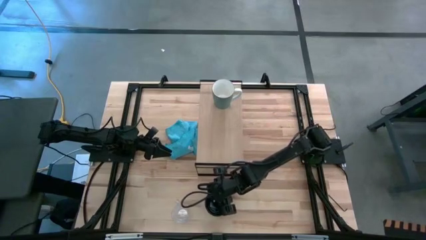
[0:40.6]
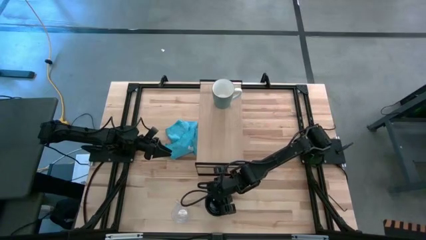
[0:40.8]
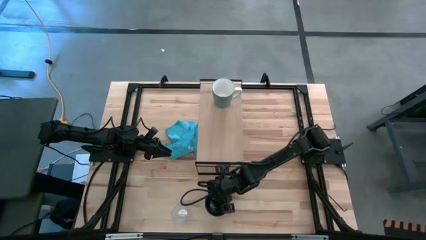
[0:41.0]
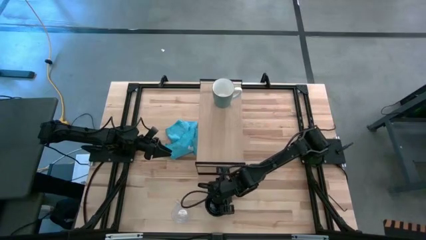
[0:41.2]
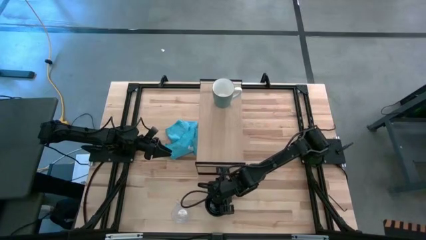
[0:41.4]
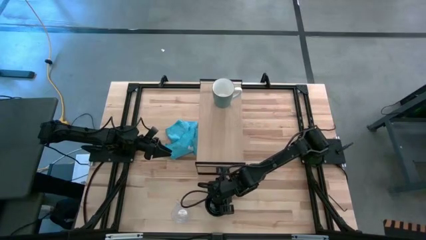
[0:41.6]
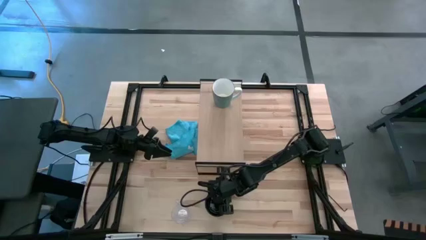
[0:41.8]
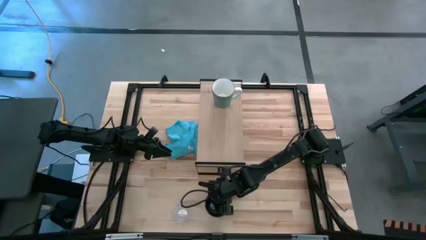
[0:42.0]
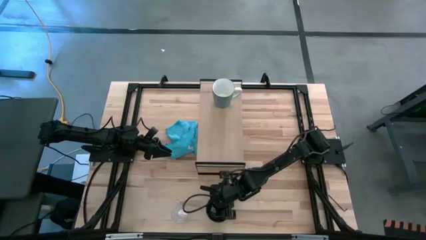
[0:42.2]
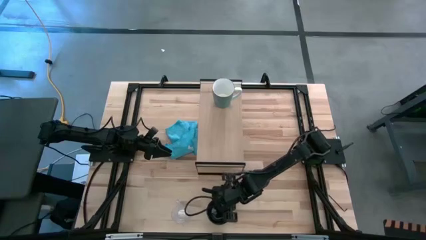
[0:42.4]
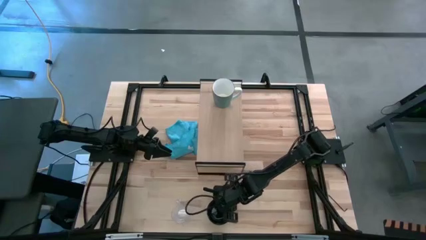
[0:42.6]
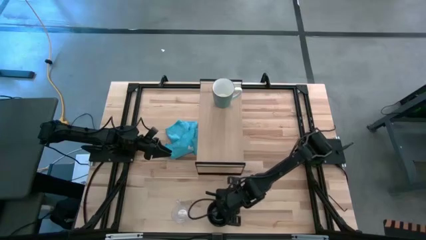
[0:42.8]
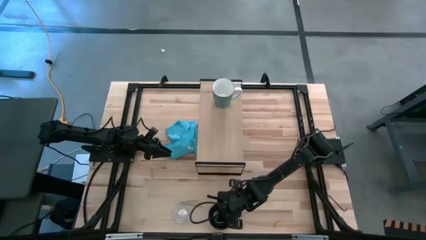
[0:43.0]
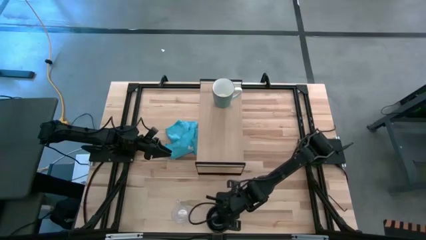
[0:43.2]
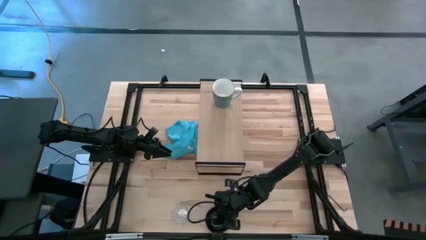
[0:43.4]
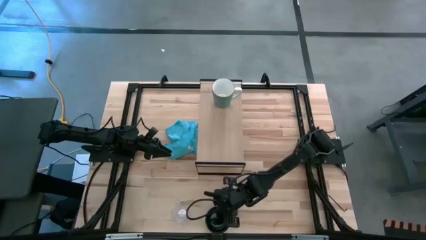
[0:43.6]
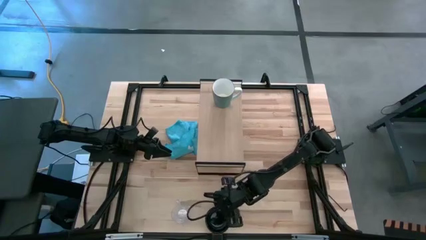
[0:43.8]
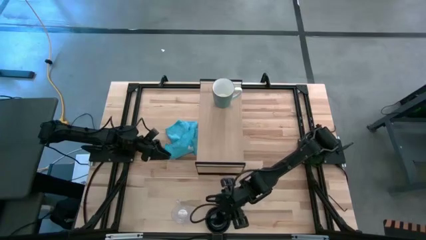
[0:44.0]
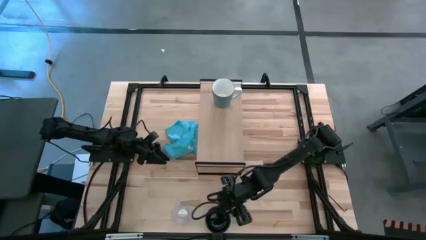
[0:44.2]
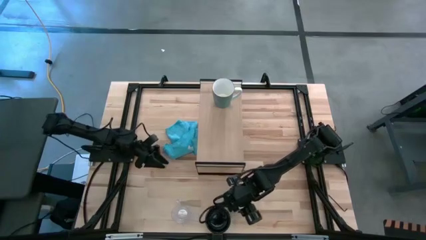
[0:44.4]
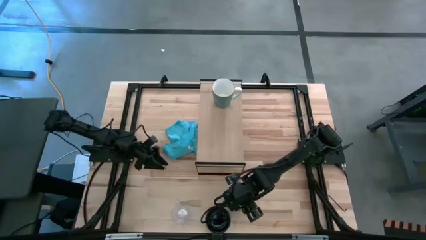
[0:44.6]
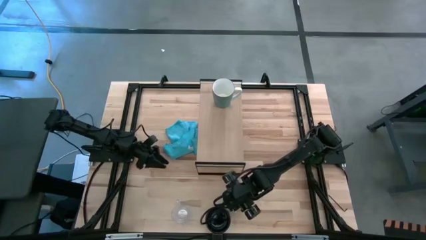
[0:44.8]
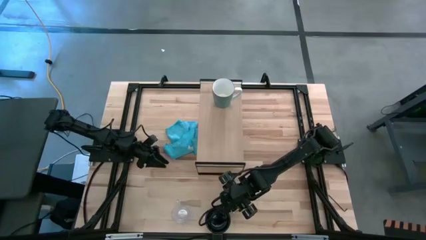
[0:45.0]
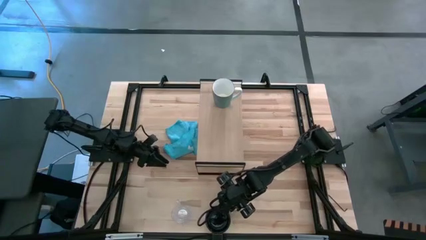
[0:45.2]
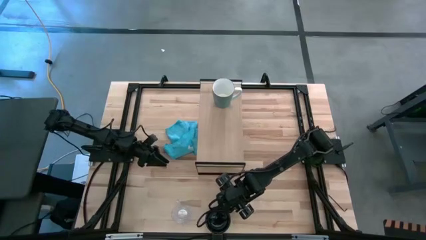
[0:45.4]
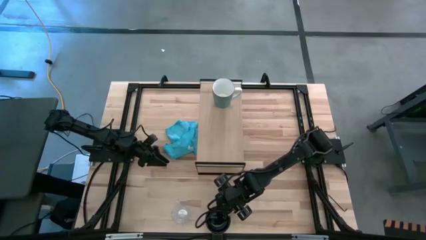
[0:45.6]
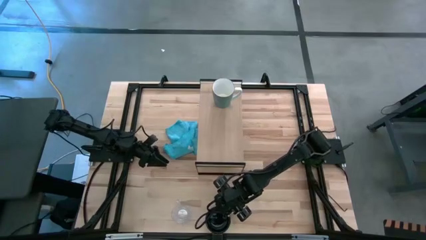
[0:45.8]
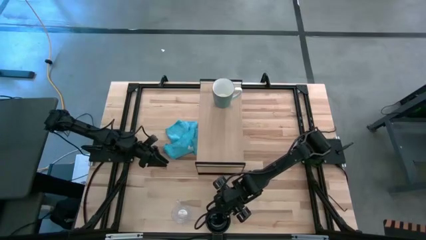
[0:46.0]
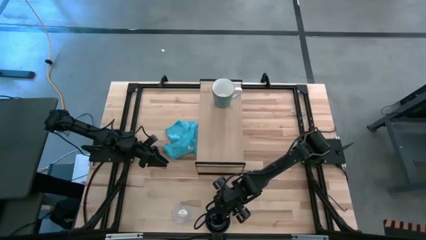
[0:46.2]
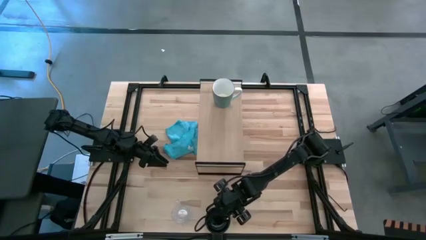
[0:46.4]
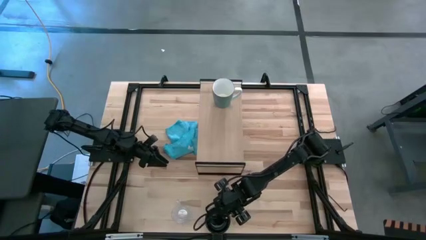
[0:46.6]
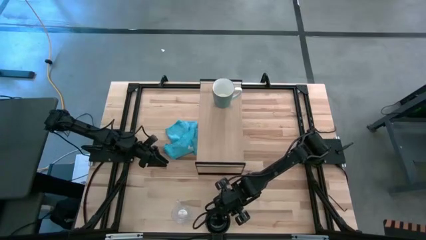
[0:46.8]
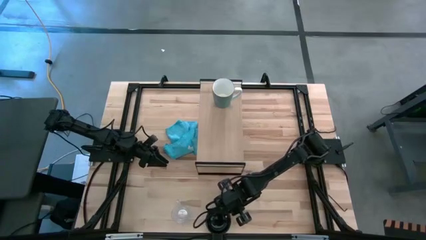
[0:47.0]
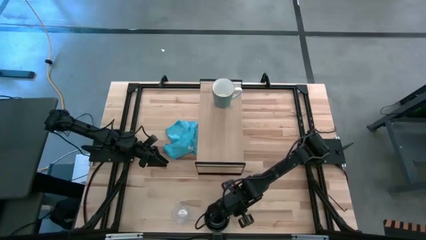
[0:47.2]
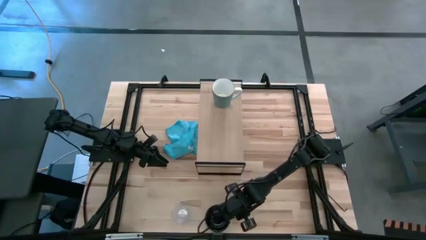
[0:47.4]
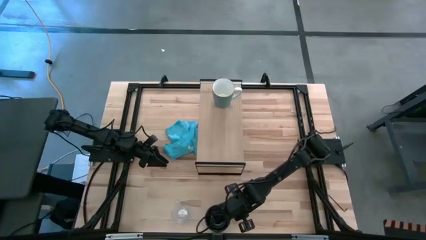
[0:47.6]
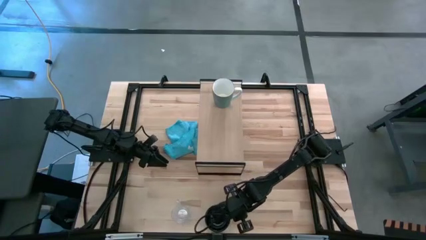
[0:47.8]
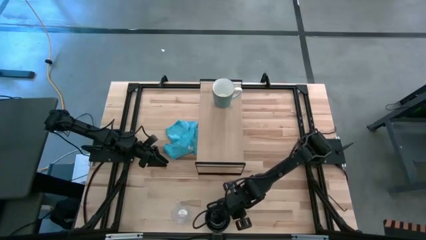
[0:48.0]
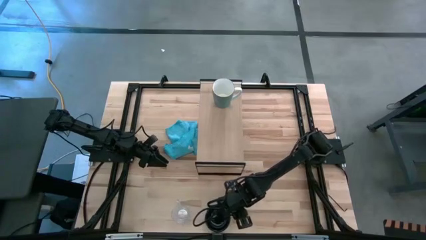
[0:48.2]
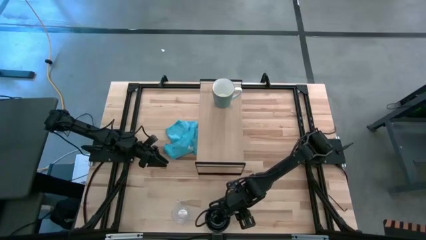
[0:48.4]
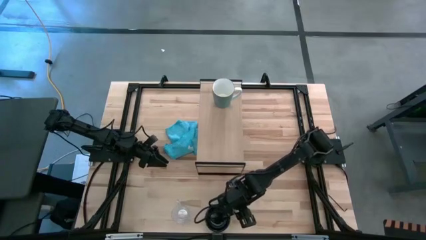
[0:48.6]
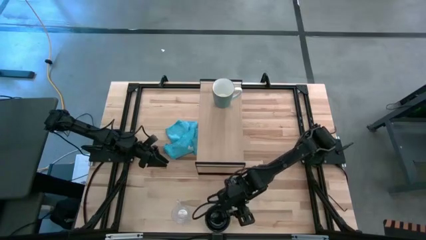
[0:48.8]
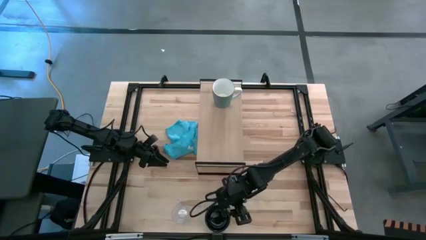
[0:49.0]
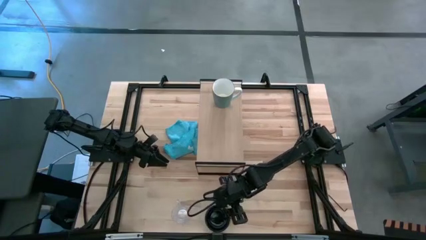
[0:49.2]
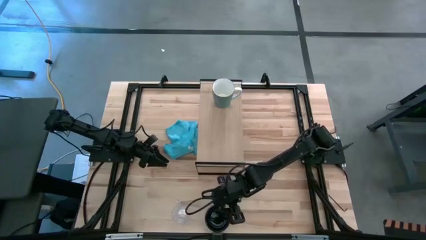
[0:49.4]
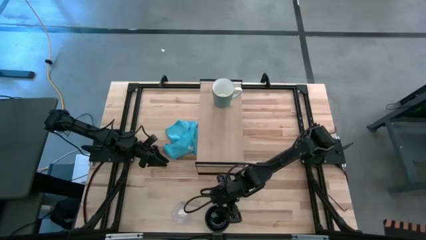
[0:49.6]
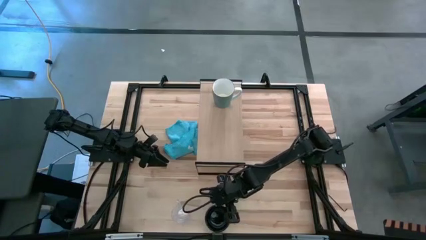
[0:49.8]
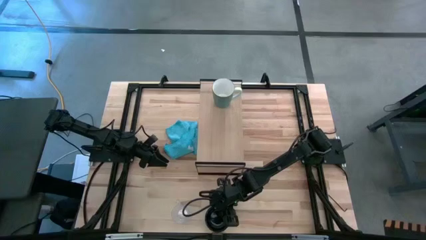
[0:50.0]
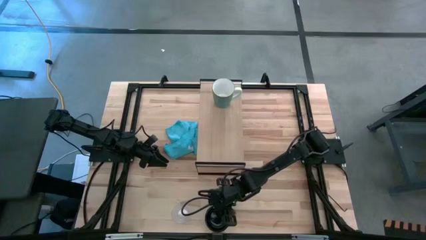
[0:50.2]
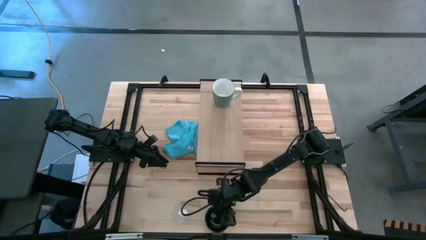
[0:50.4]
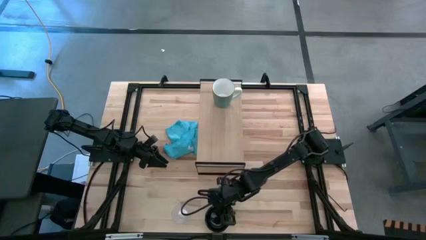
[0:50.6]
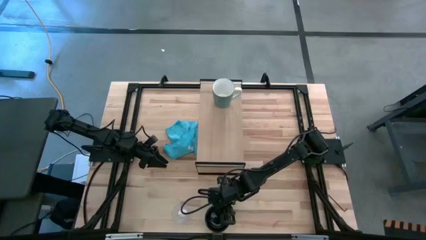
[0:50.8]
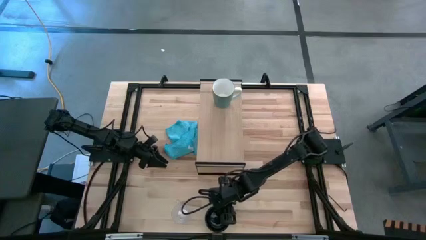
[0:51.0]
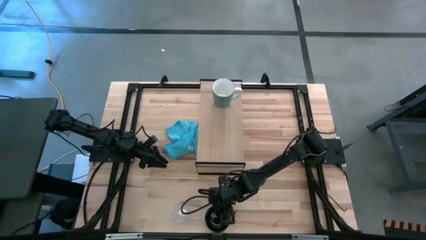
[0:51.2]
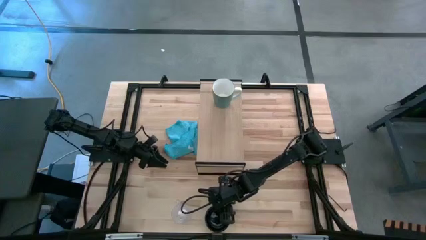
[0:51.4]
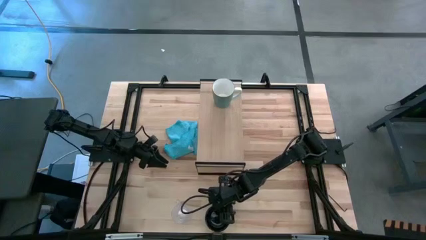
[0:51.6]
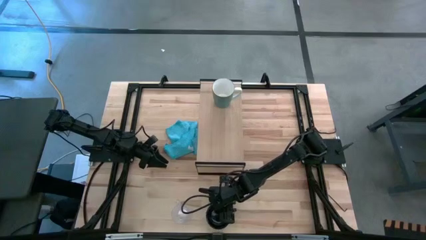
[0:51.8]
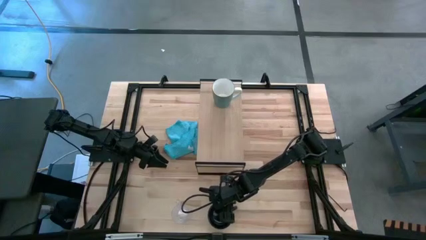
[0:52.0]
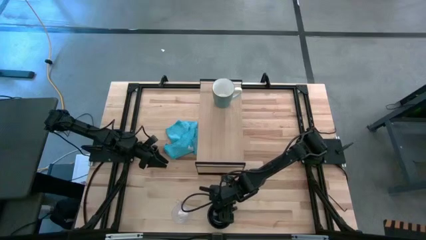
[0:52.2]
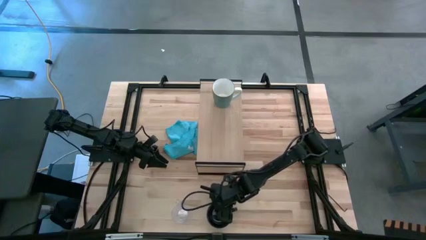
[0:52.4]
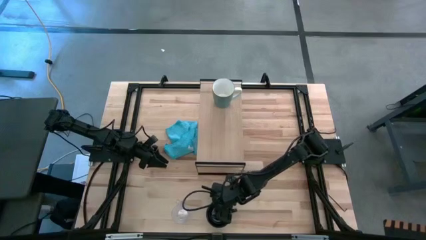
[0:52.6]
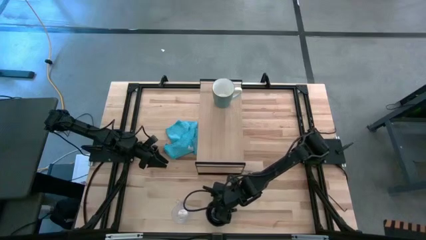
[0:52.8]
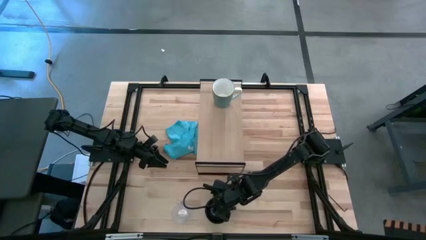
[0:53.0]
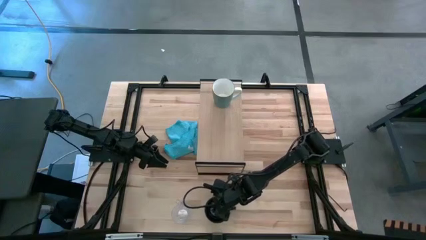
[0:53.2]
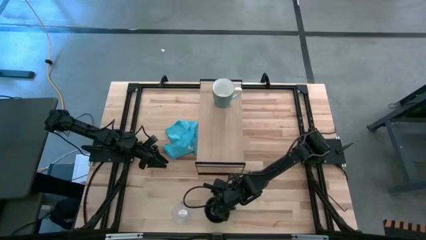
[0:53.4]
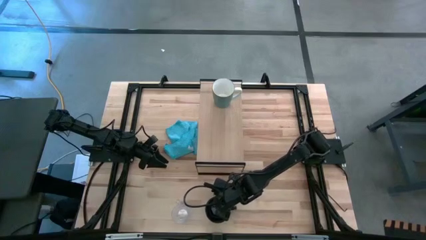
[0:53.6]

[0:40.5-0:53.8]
Task: Stack small to large cups/mugs on shelf
Put the black mug on the shelf
